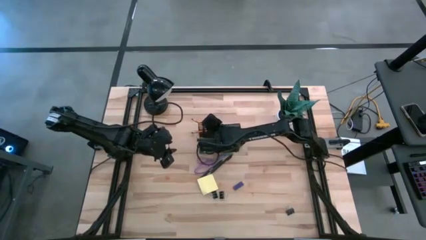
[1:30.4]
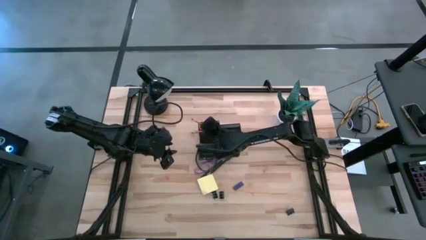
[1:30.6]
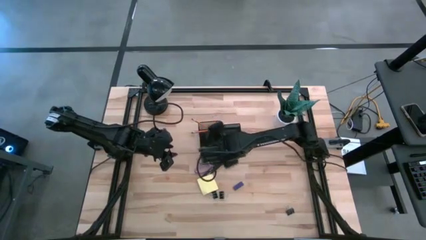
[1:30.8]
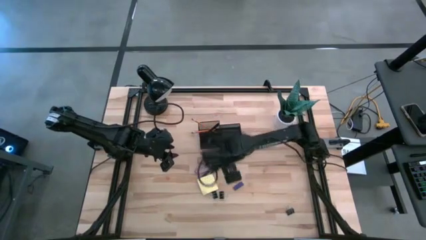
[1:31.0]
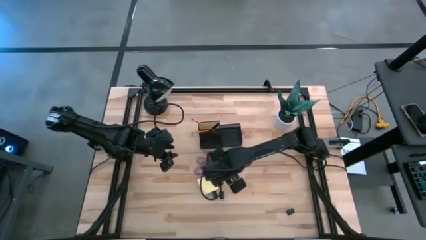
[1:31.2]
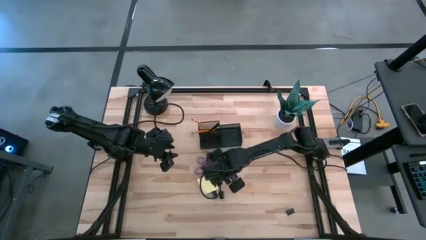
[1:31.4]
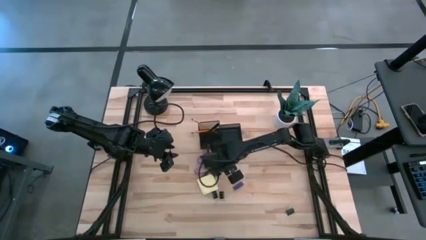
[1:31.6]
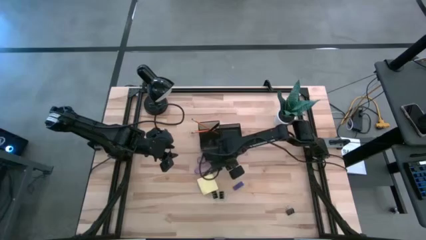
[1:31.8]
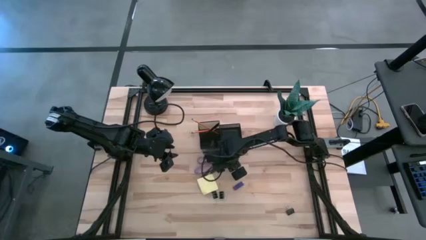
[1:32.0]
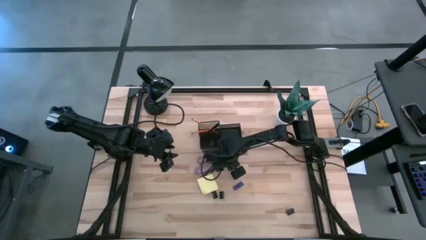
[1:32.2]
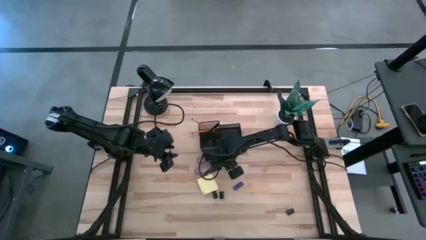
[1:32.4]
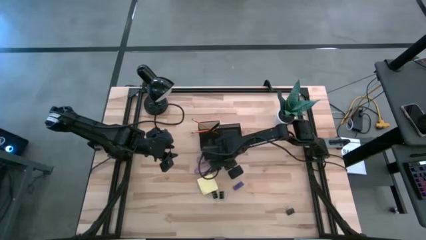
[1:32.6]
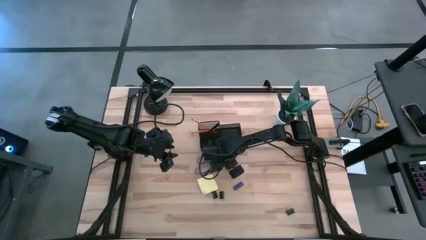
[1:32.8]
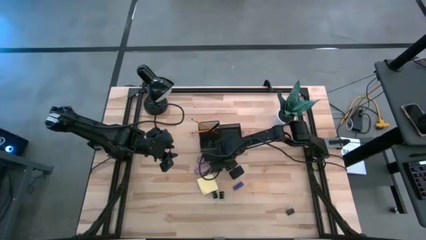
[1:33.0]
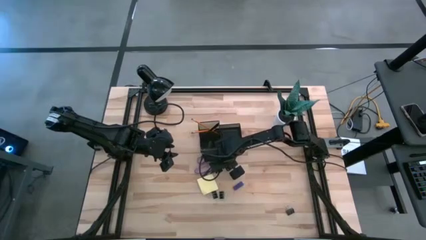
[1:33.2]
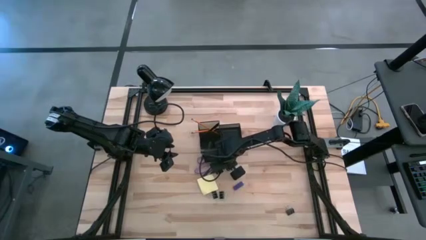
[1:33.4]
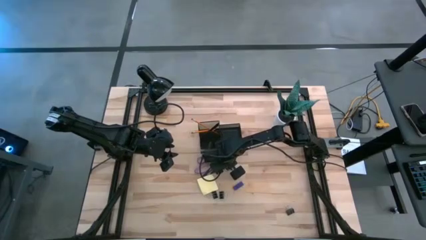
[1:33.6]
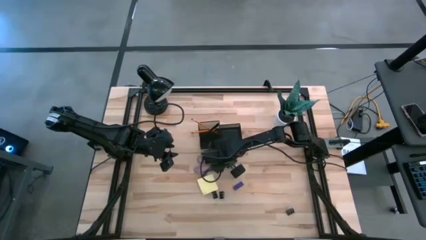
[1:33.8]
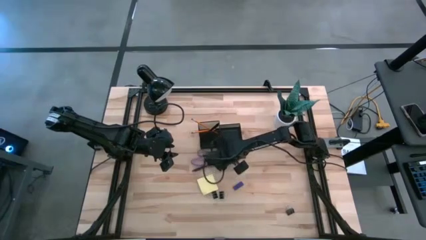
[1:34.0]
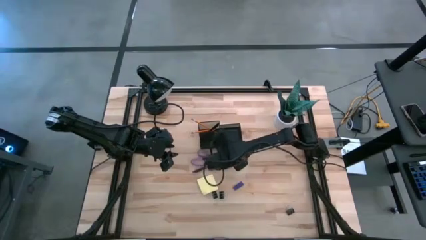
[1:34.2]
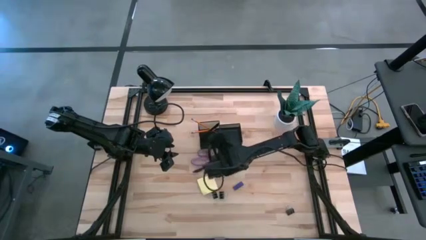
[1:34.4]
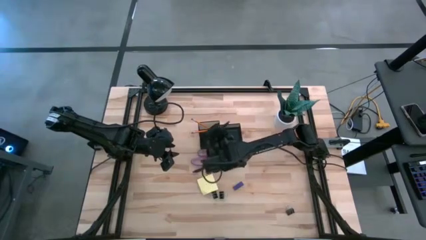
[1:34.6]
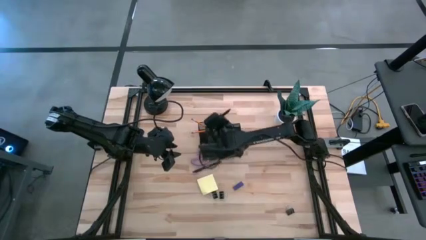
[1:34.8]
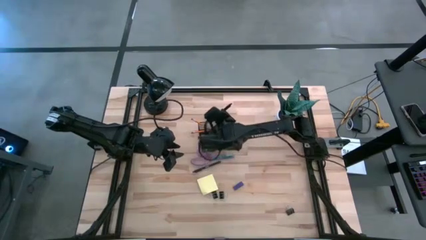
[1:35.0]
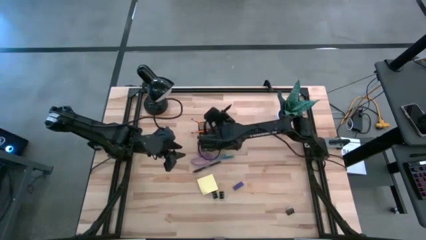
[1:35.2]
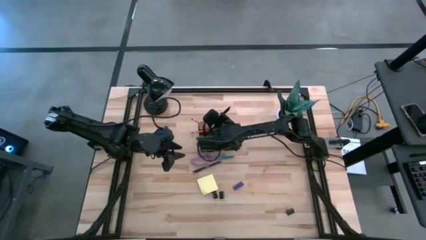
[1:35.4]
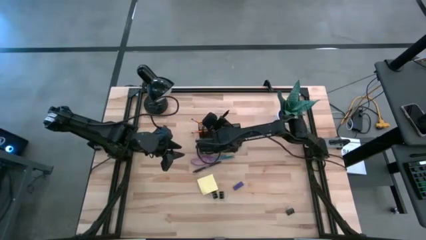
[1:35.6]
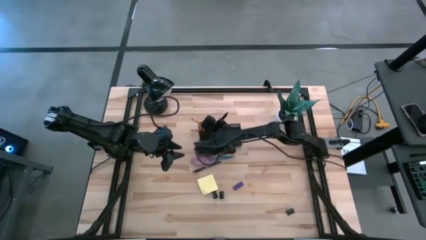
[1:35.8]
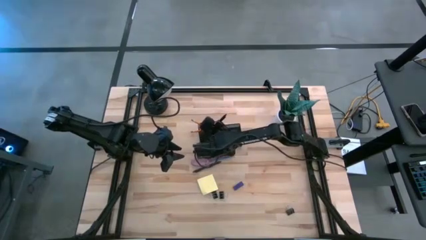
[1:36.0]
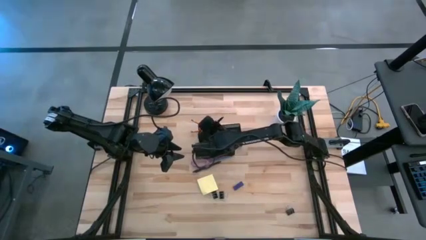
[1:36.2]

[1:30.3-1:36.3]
Task: Pick and place office supplies into organizer
Put the right black pen into the black desk organizer

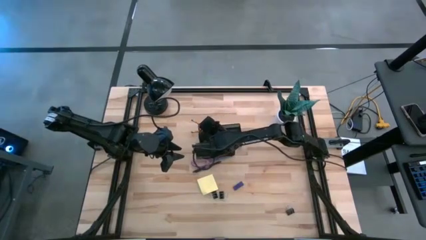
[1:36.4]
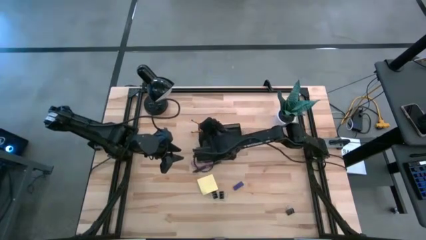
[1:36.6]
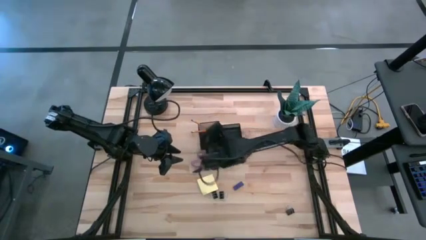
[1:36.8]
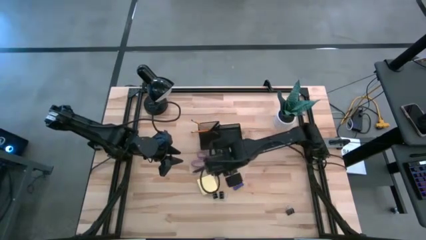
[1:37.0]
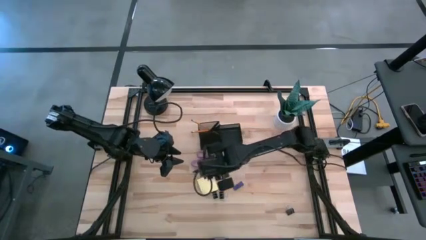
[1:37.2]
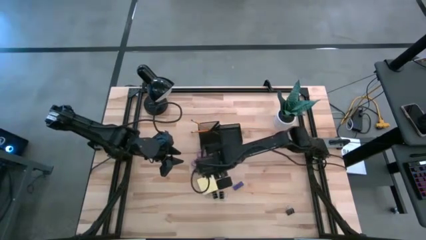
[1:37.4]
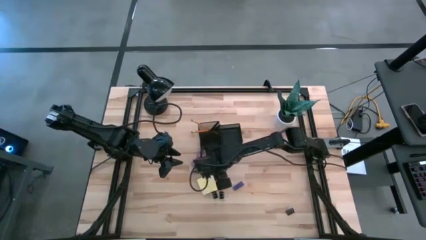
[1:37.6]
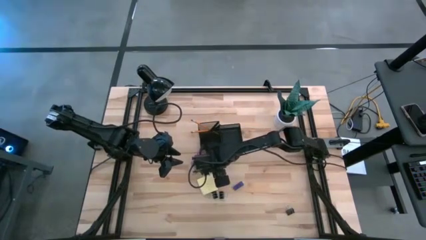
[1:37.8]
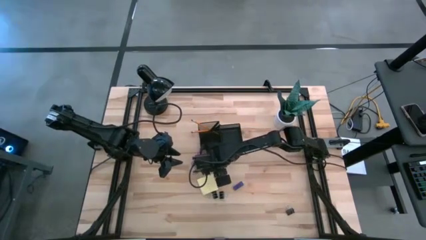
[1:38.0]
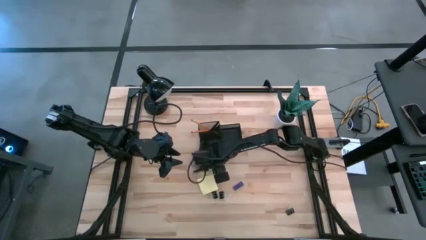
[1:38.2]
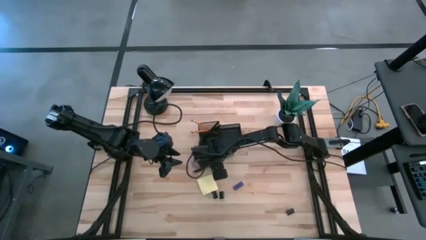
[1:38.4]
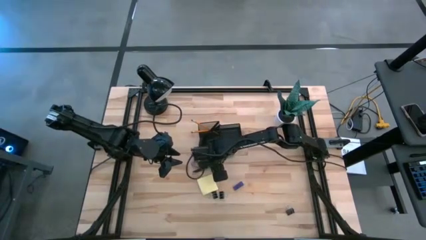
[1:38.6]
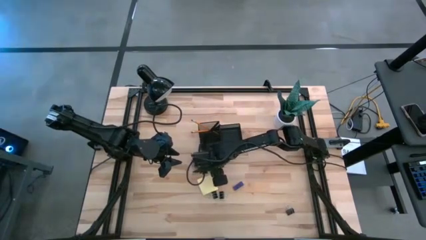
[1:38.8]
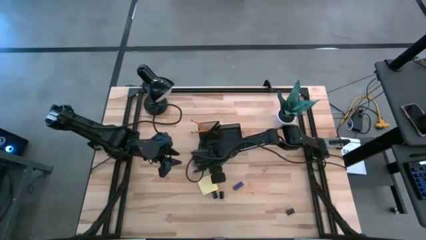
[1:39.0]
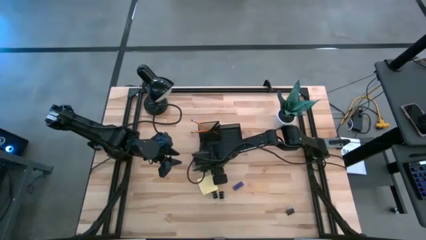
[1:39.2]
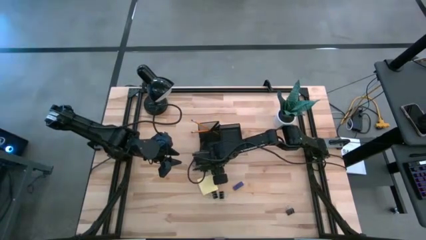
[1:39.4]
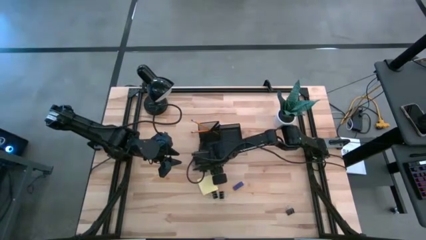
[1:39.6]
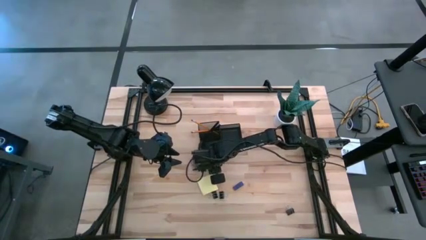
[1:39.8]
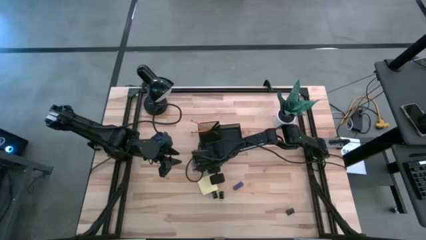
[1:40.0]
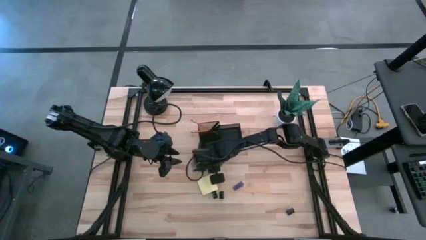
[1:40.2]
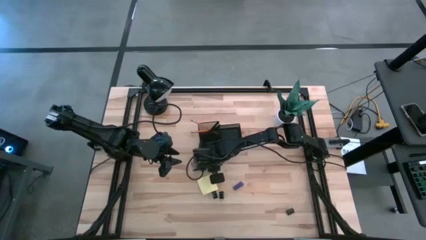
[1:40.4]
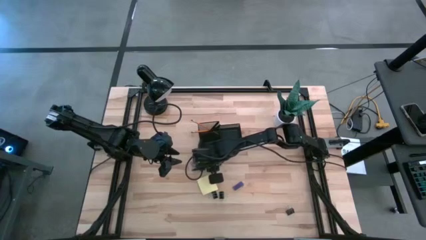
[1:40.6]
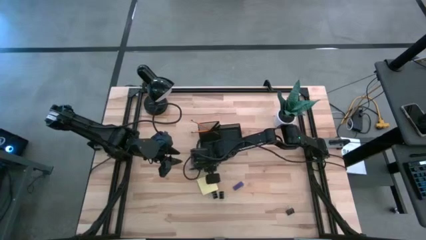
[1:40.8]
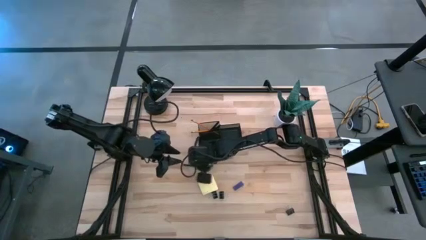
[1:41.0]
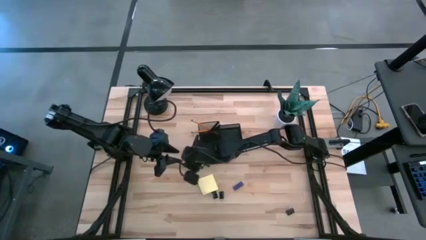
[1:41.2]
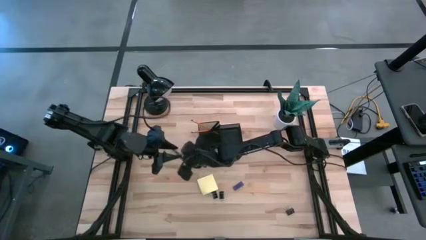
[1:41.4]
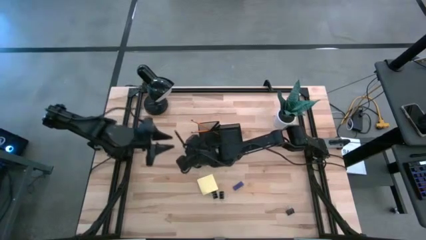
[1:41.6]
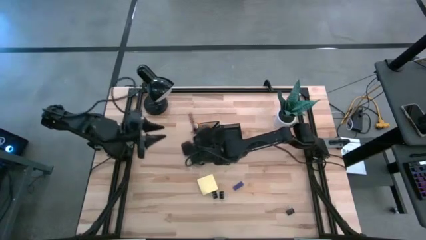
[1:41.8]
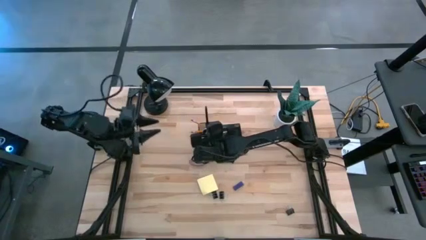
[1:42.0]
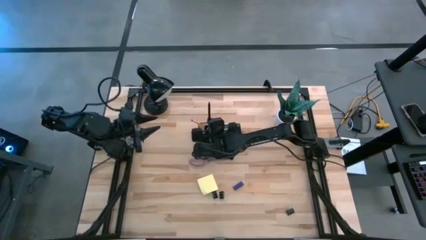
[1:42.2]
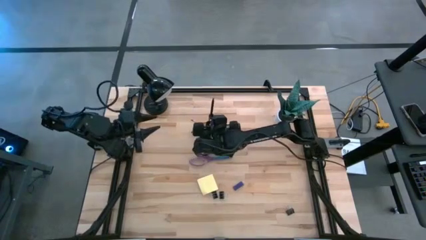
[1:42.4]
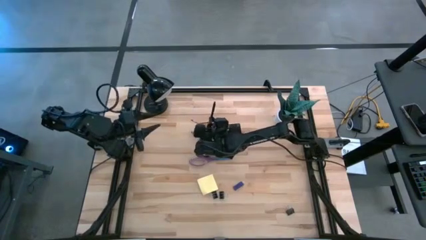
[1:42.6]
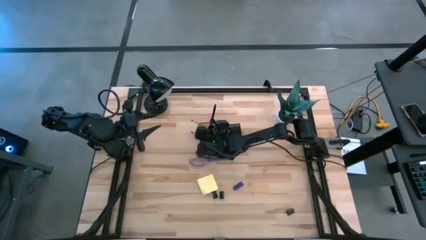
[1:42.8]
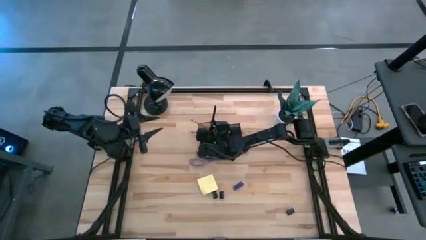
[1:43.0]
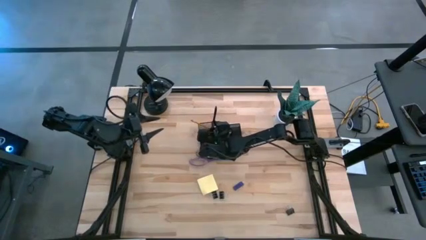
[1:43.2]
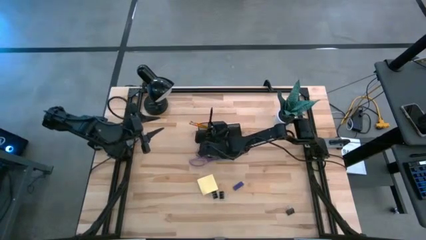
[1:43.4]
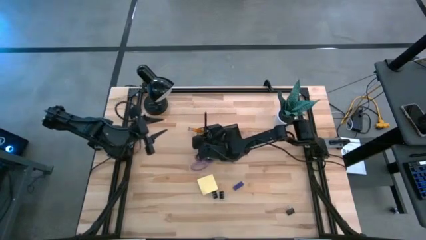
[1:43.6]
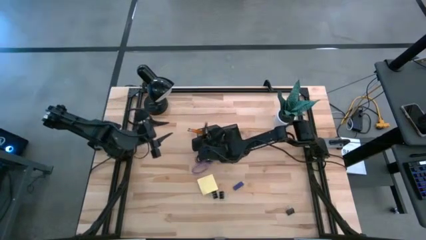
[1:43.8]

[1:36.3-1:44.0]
Put the black pen into the black desk organizer

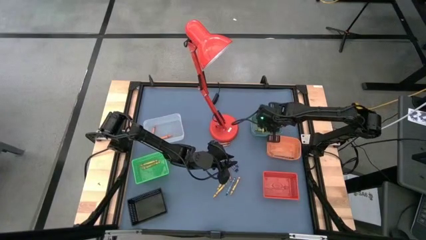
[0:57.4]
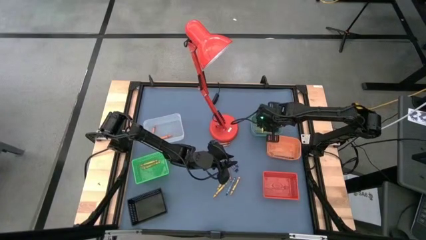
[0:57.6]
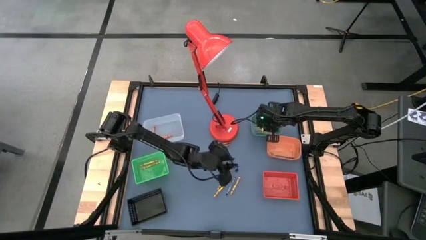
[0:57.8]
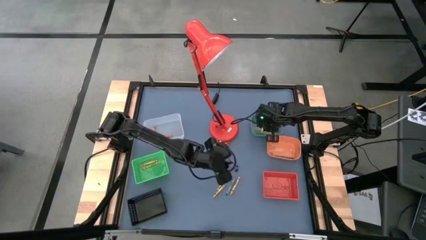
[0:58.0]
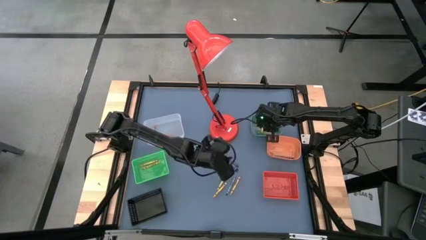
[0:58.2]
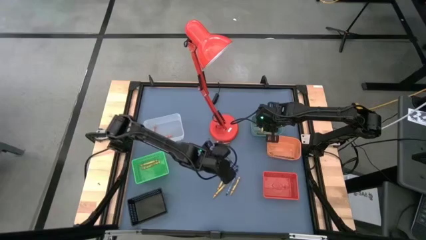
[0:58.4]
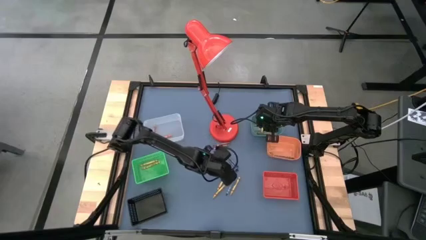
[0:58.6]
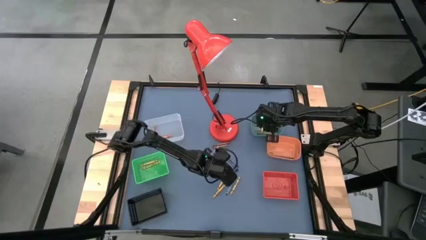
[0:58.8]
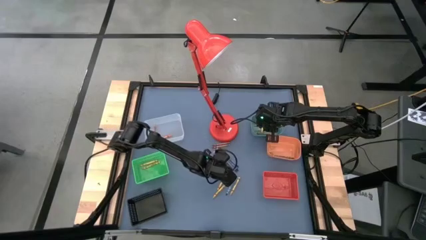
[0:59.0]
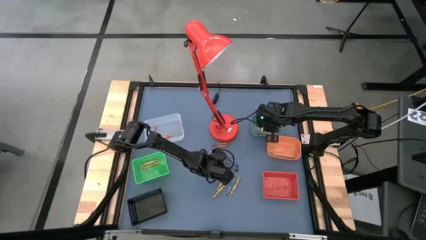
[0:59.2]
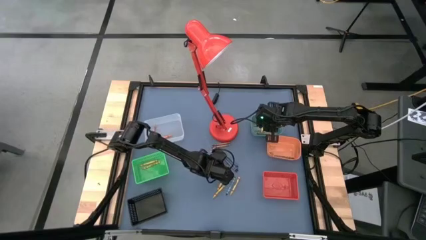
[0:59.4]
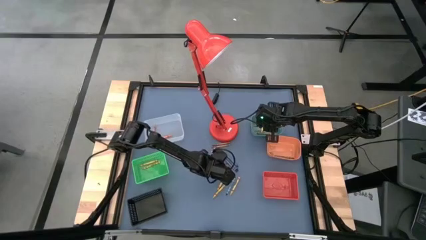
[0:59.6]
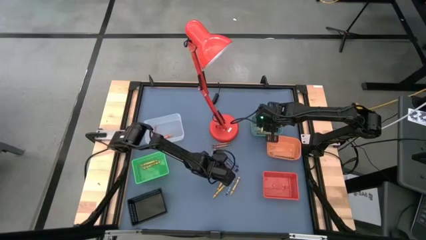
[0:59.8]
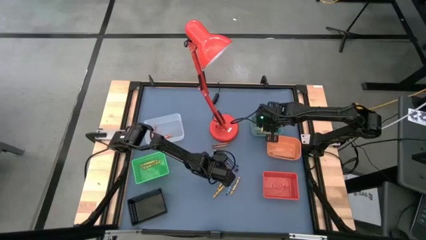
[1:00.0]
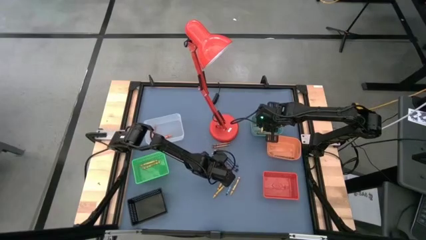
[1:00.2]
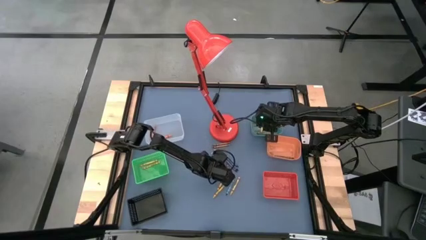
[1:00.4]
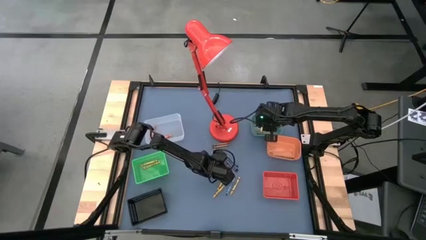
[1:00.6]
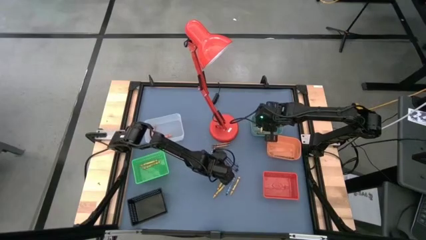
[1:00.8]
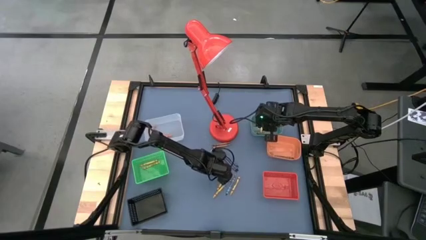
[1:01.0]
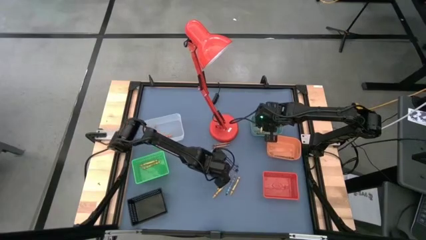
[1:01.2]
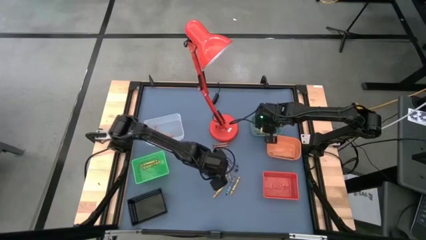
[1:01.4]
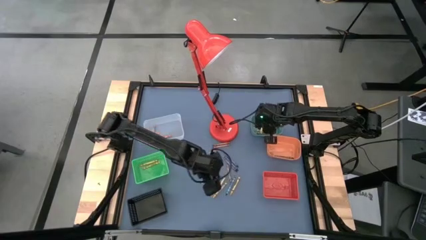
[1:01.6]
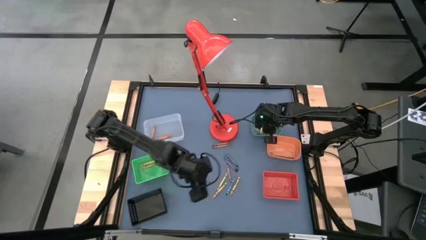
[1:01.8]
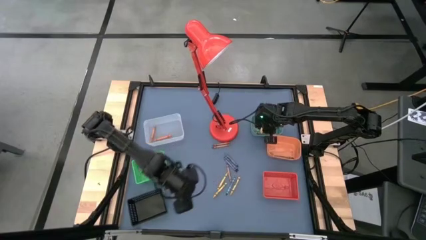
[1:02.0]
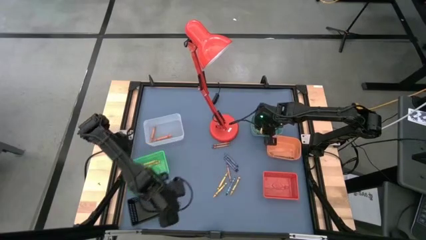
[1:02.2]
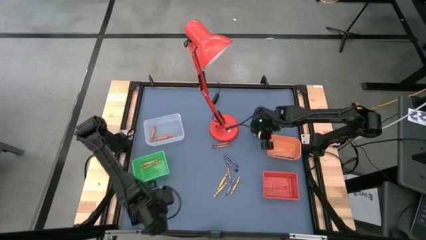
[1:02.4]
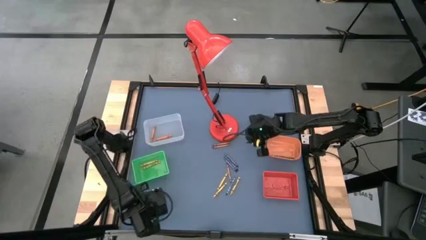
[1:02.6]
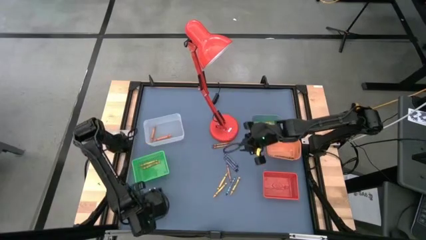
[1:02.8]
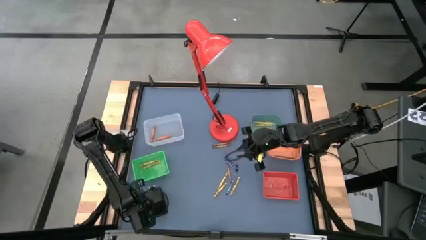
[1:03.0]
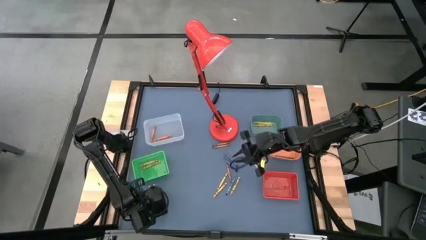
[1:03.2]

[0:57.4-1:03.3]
Task: Sort crayons
Put the blue crayon into the black bin
